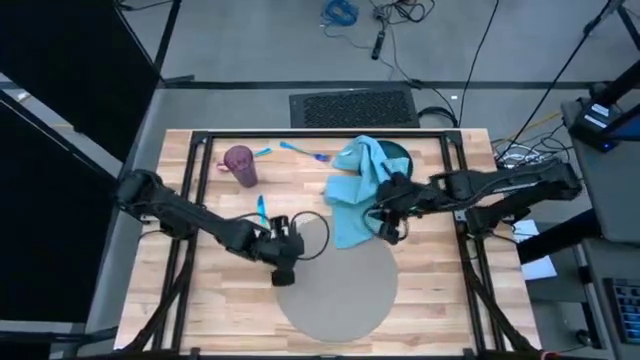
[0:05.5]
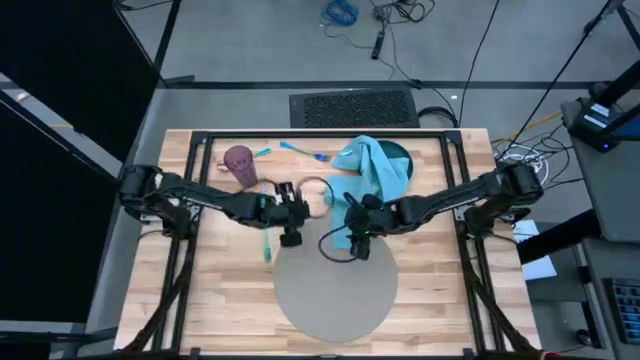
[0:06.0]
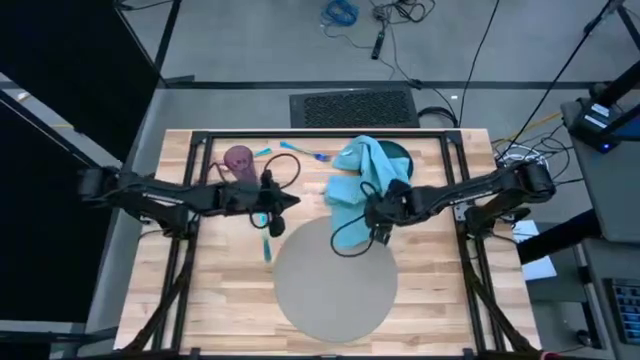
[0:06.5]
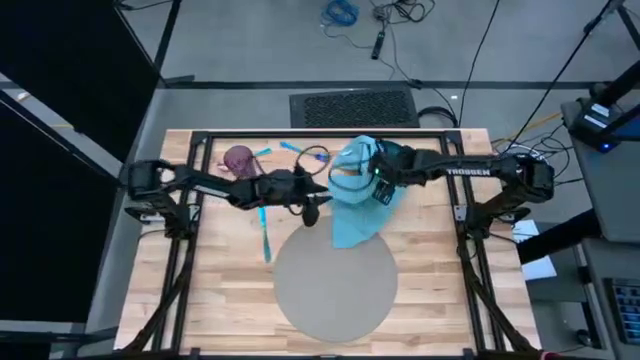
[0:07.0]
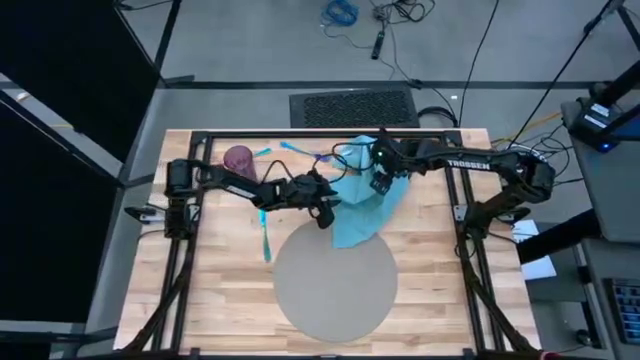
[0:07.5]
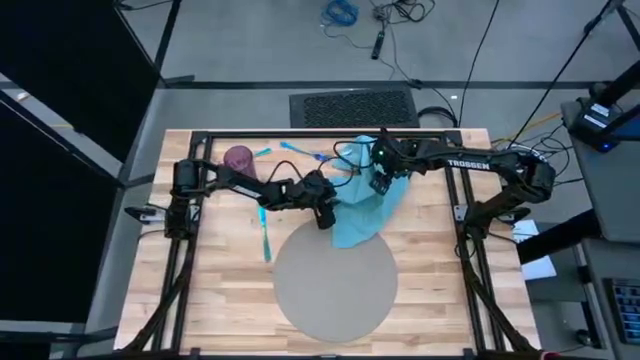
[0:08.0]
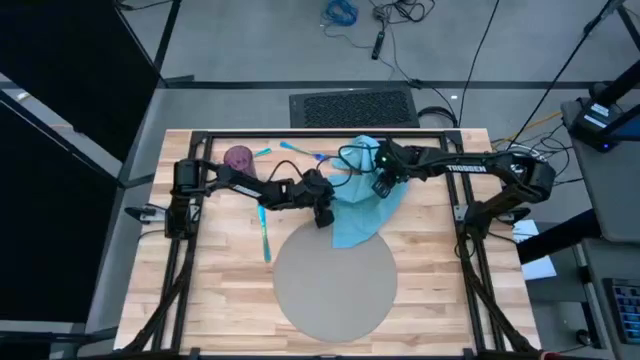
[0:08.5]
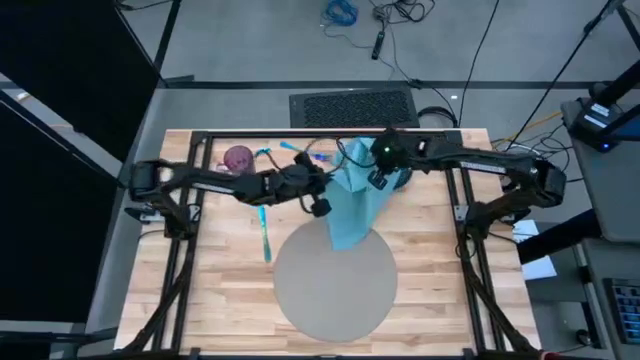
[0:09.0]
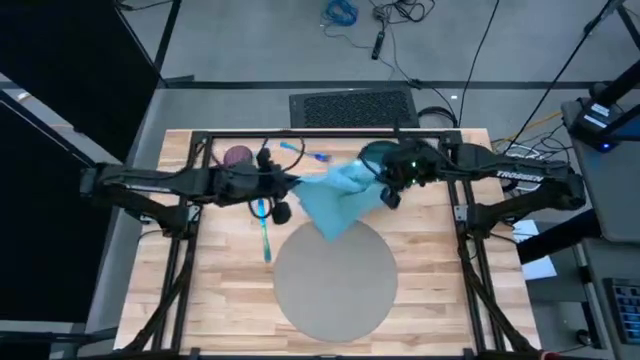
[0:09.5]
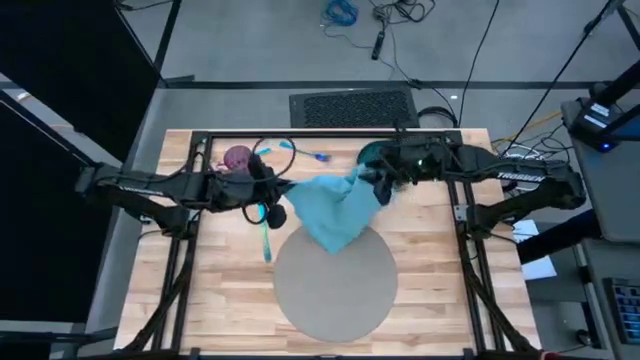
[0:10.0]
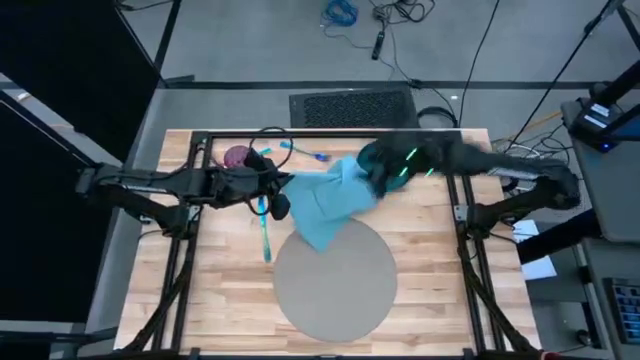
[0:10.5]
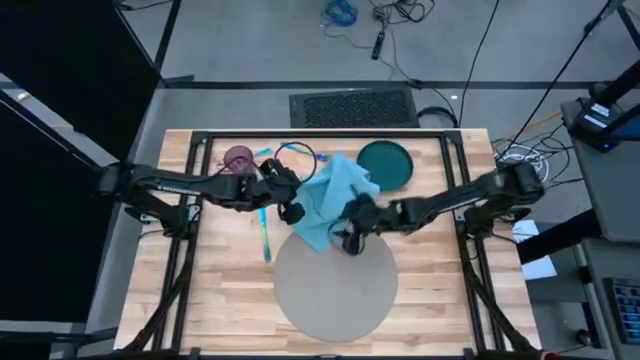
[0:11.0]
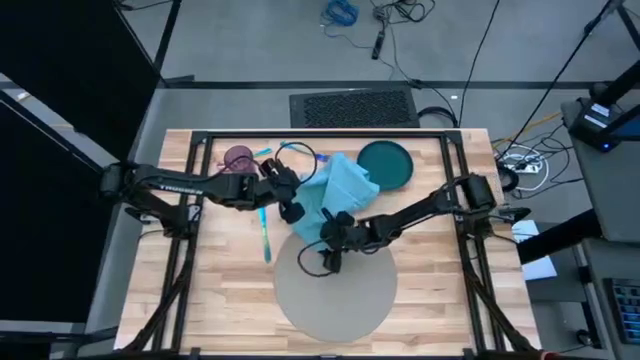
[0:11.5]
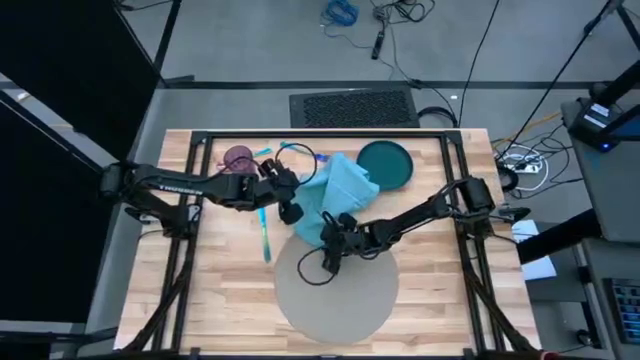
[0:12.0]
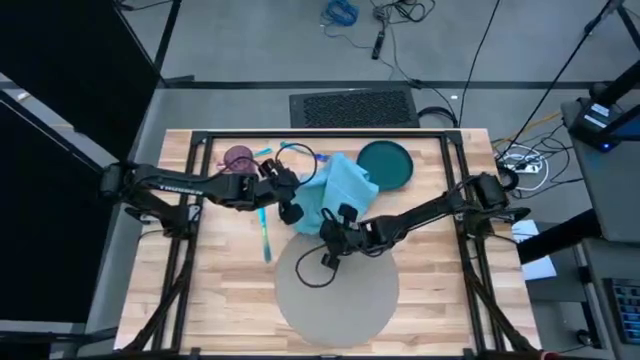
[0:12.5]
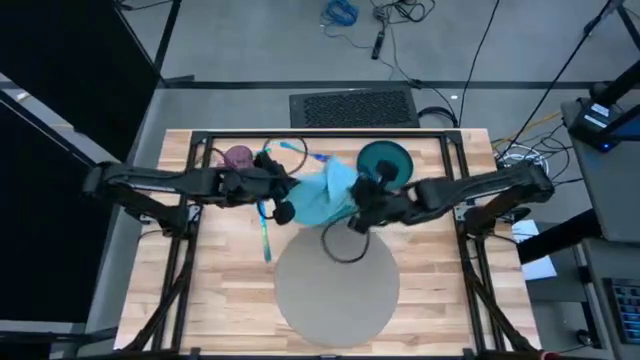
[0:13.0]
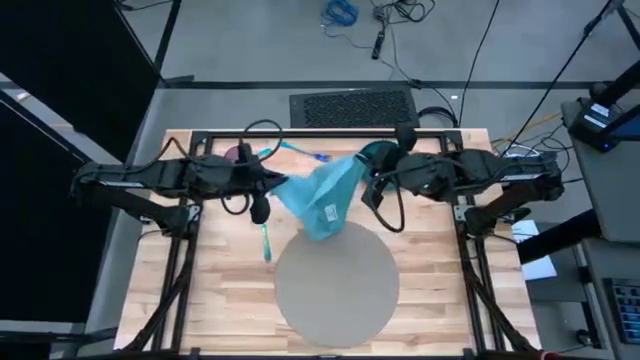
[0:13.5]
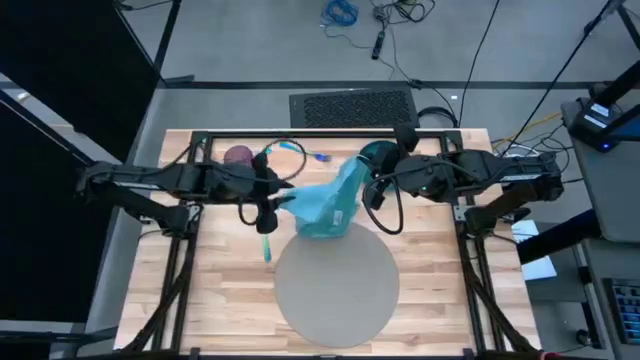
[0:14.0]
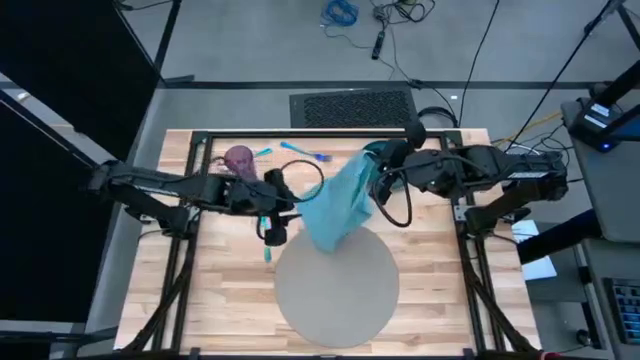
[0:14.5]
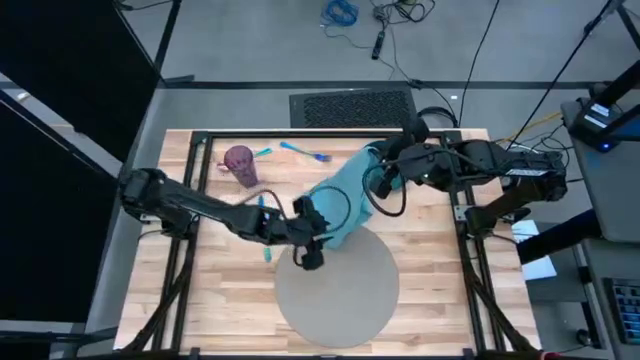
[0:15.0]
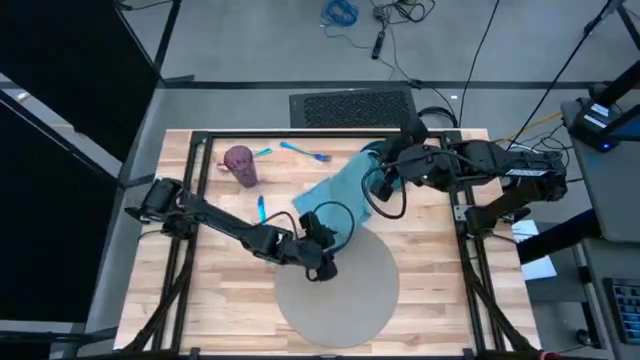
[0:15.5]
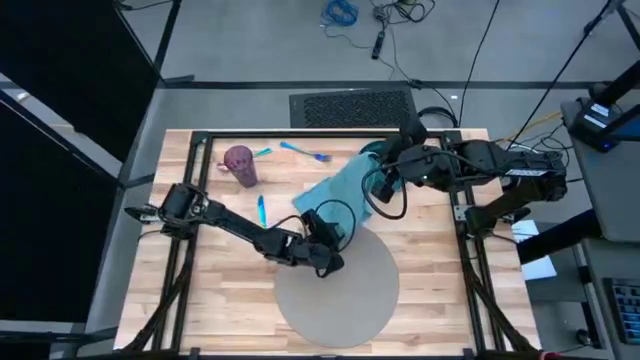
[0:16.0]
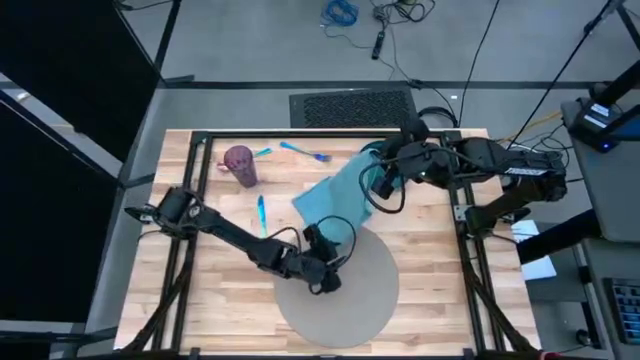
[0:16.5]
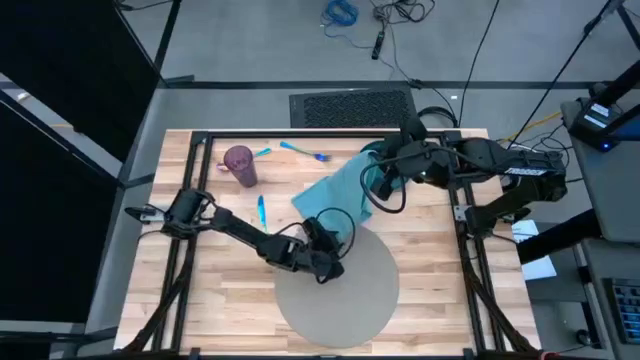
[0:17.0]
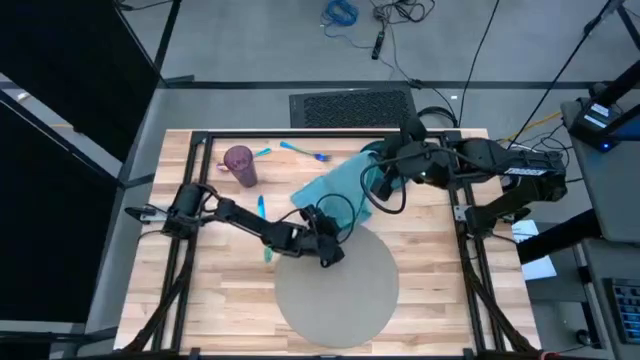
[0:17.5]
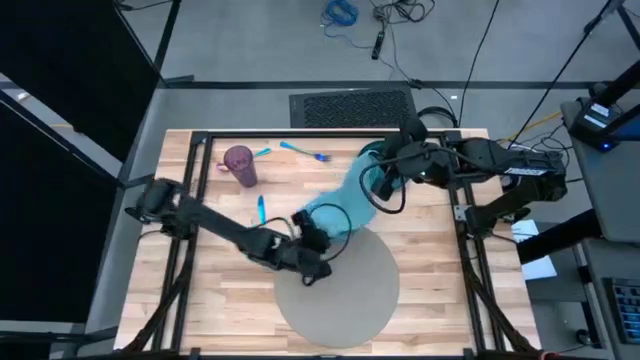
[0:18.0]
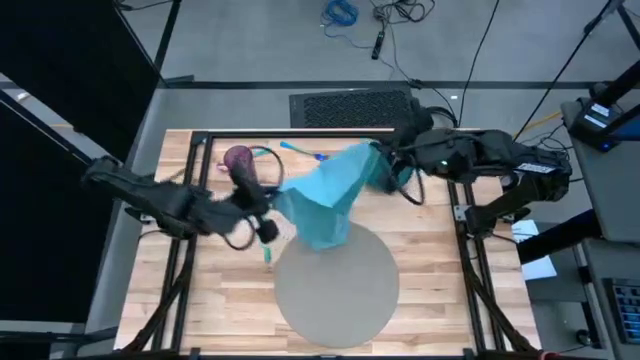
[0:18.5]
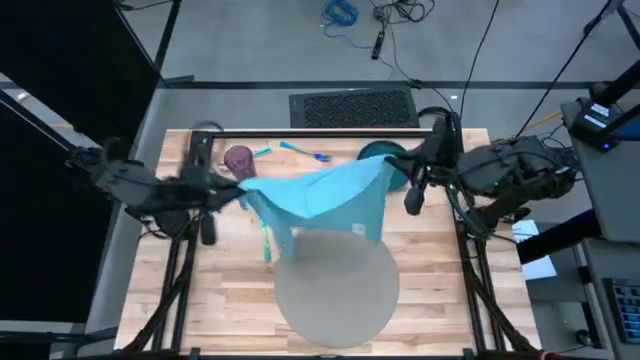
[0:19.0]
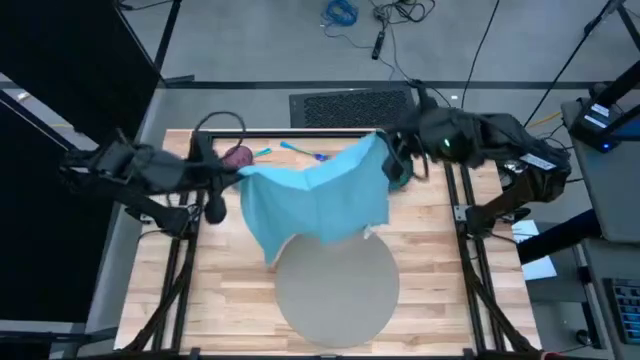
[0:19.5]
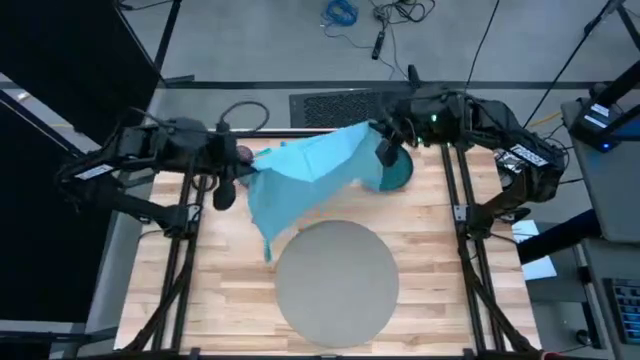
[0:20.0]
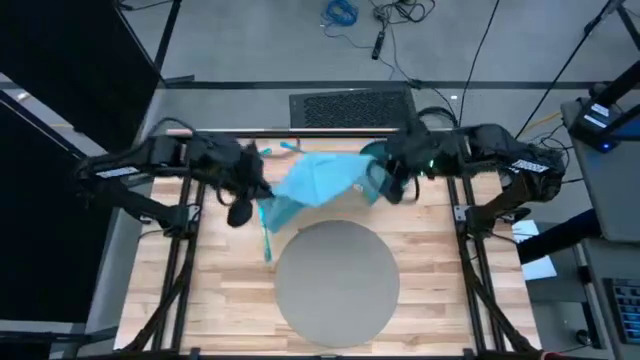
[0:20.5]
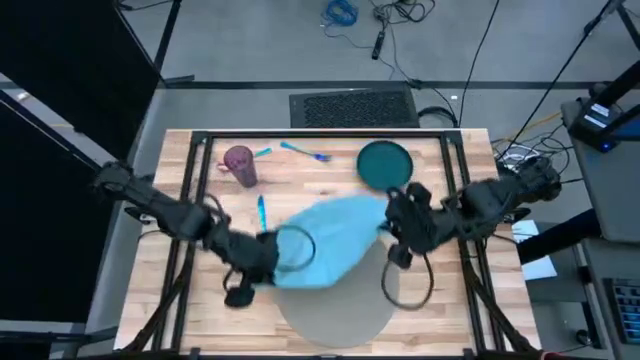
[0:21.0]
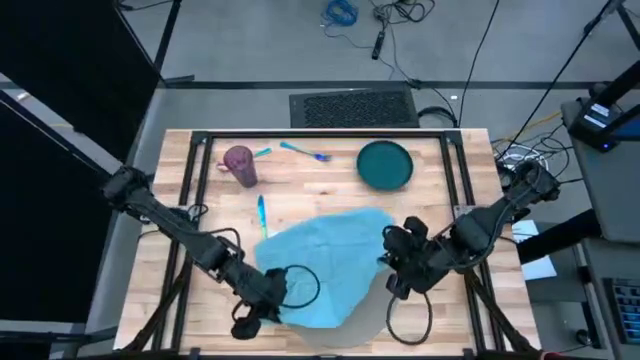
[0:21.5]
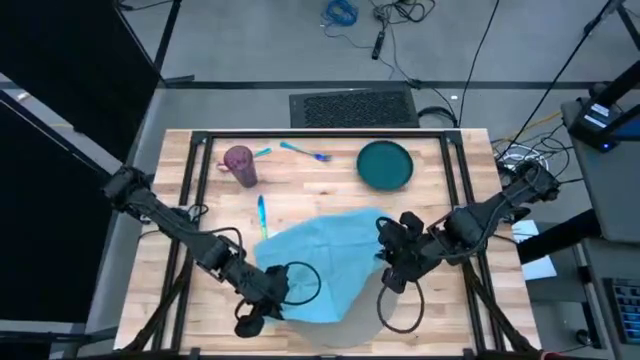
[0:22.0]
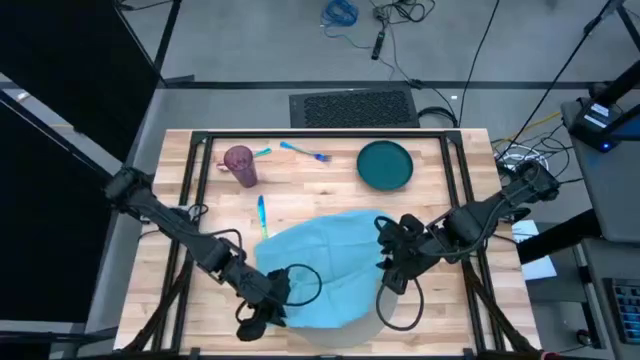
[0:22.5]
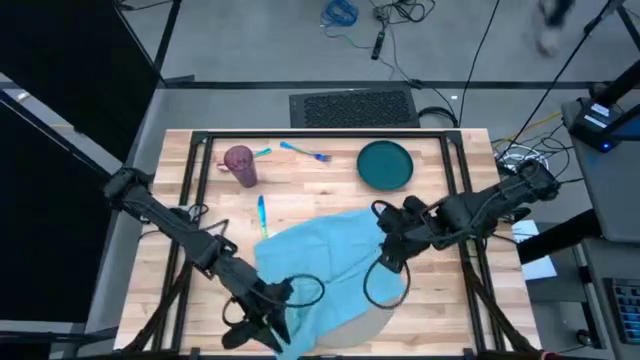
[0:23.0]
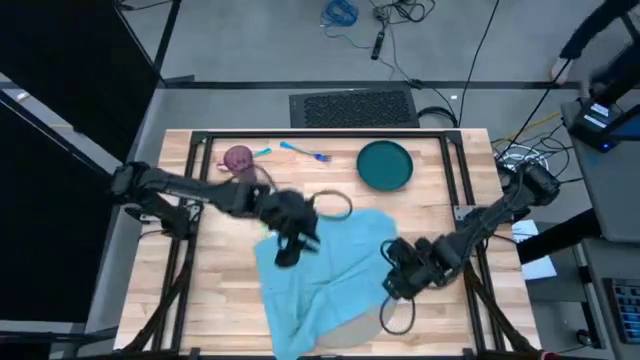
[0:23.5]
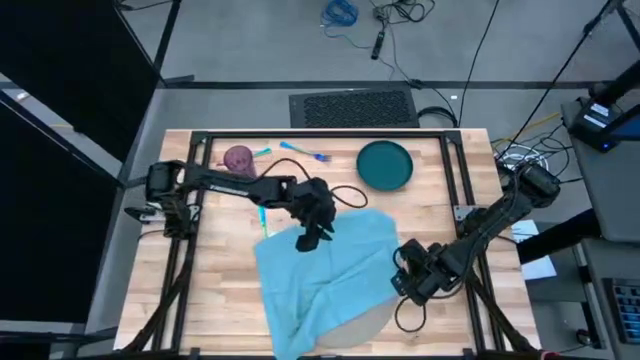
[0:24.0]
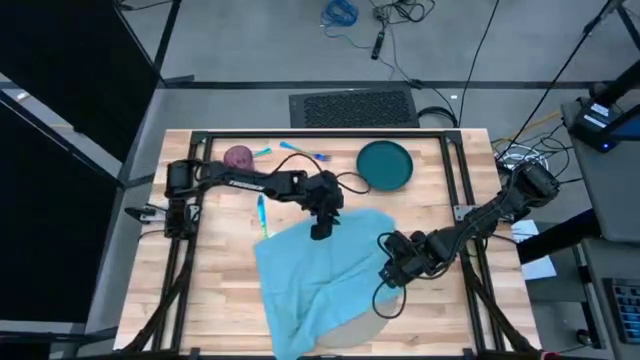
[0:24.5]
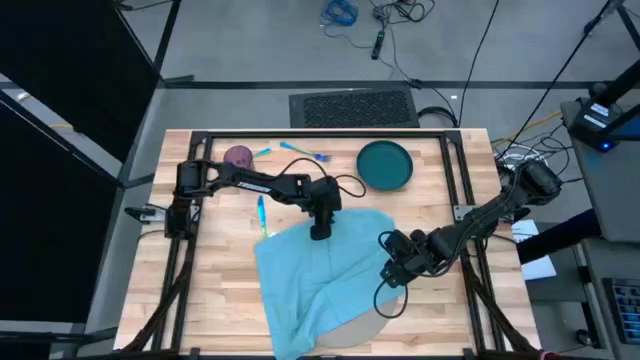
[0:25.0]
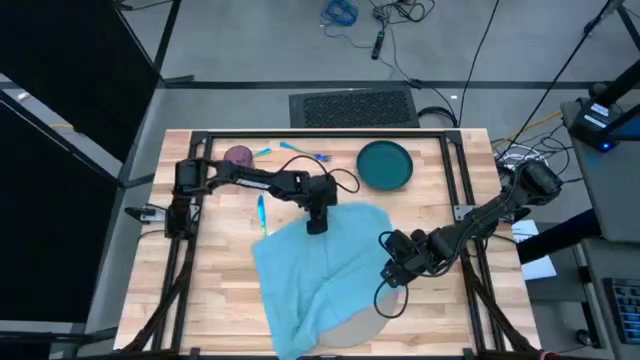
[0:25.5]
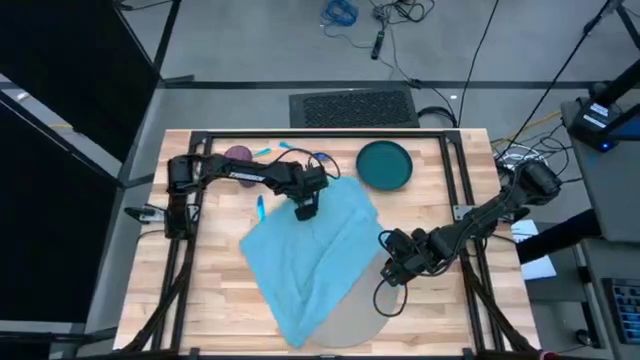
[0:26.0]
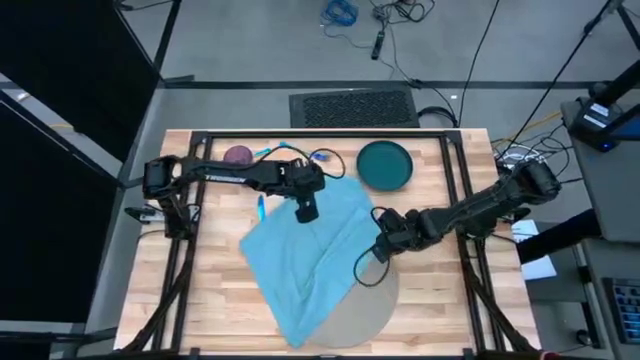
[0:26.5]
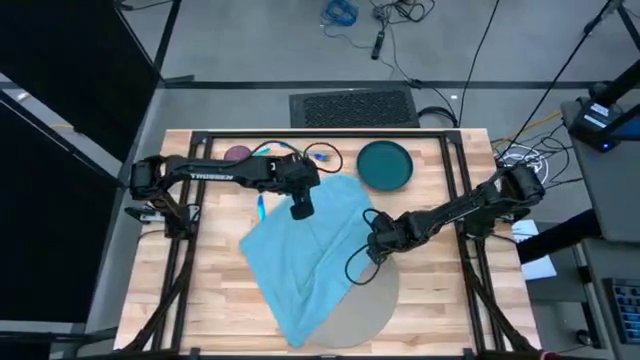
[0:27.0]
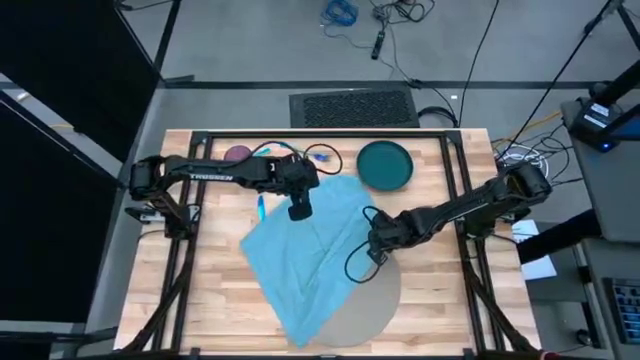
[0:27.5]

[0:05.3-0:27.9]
Task: Set table place
Fold the blue napkin
